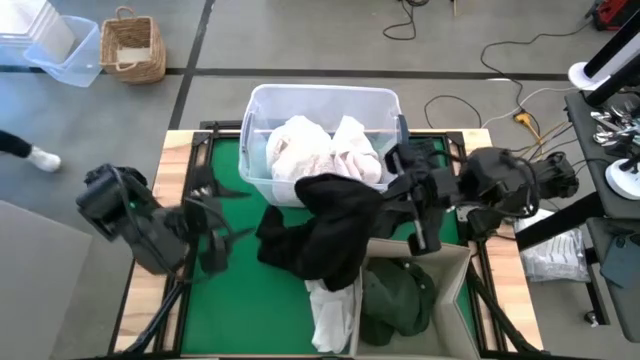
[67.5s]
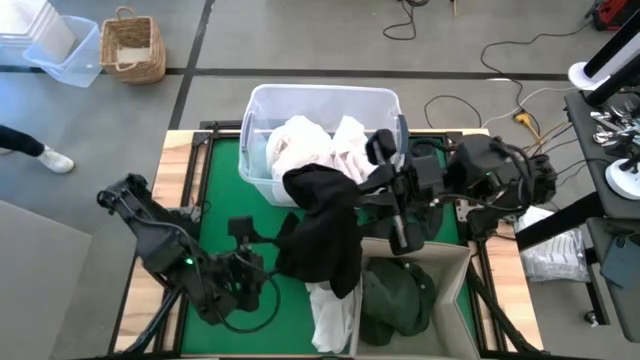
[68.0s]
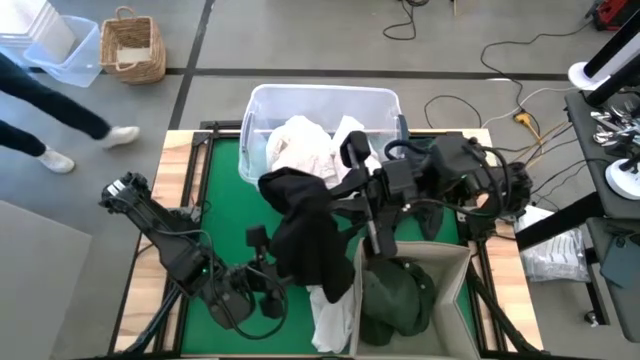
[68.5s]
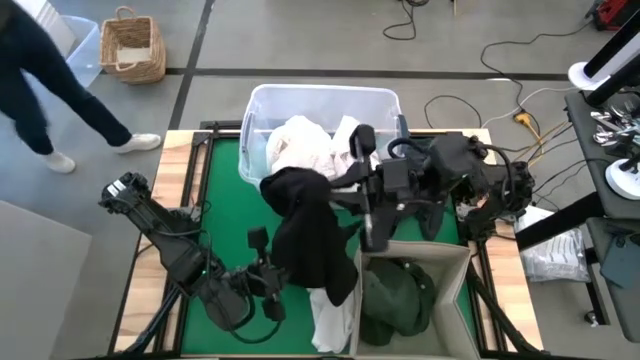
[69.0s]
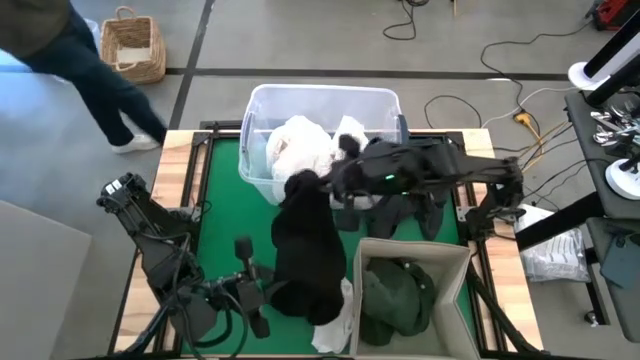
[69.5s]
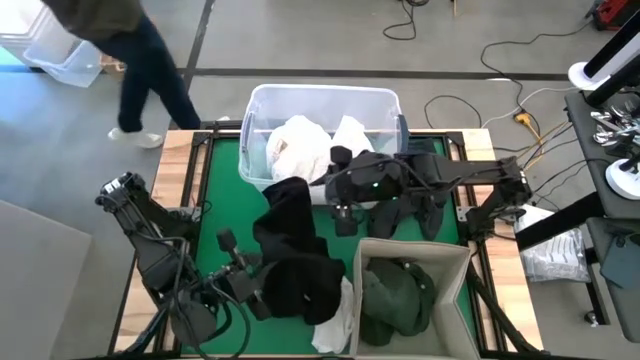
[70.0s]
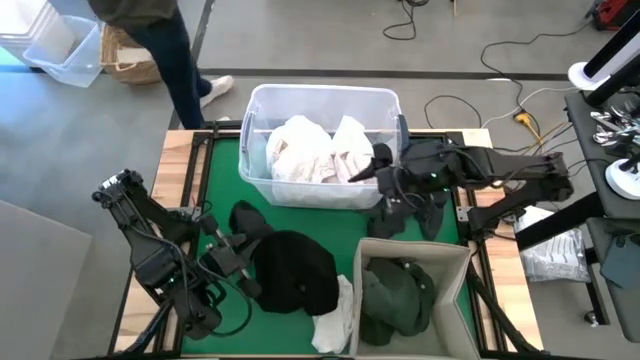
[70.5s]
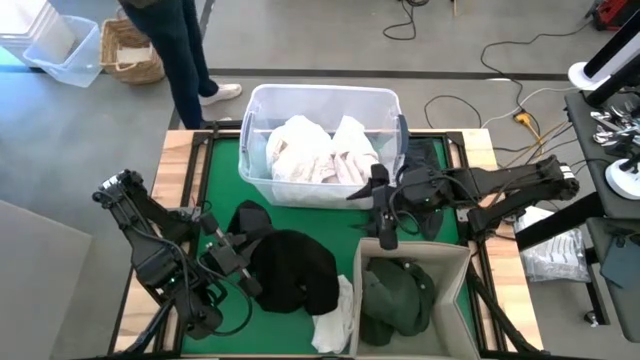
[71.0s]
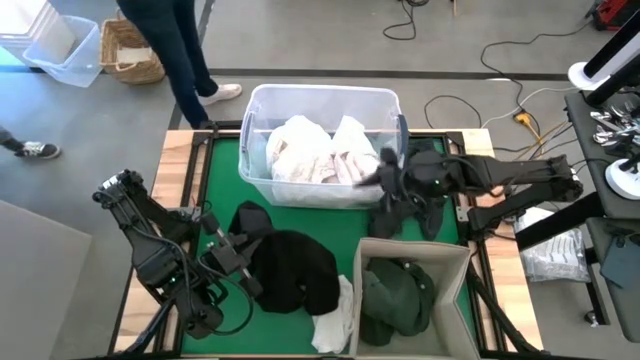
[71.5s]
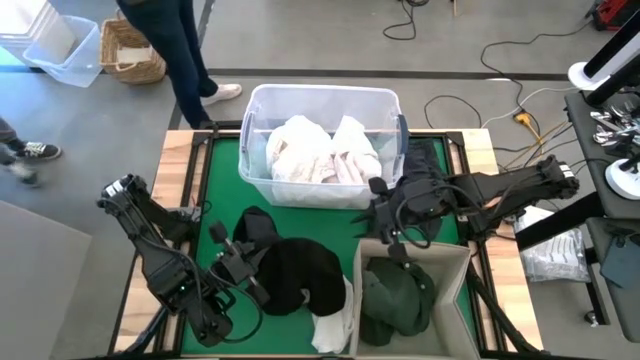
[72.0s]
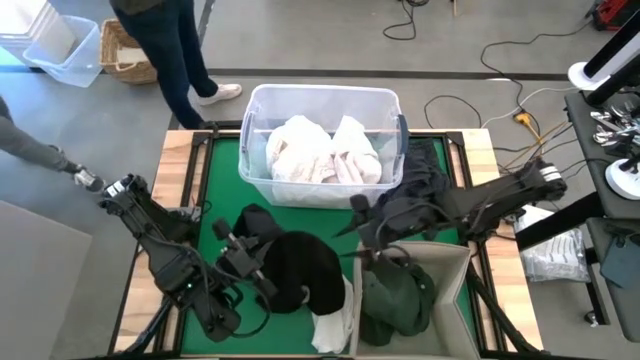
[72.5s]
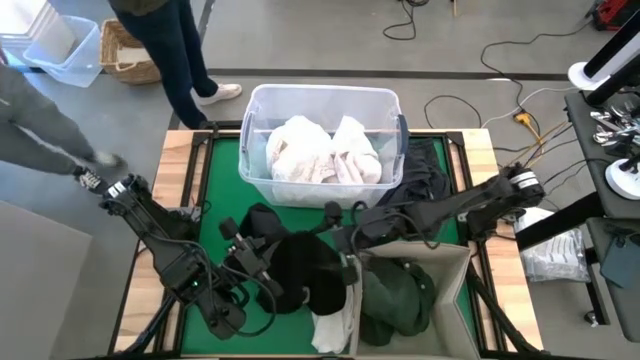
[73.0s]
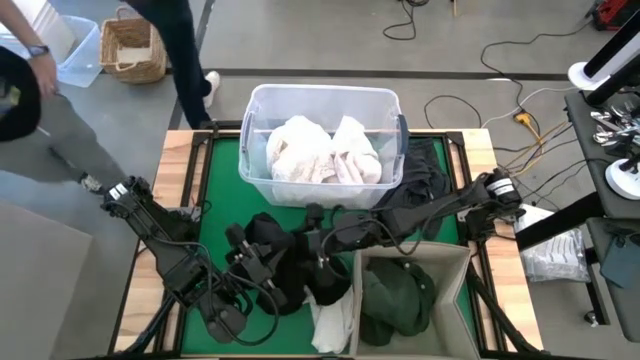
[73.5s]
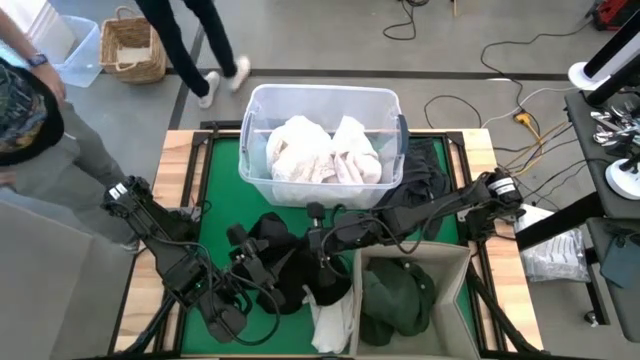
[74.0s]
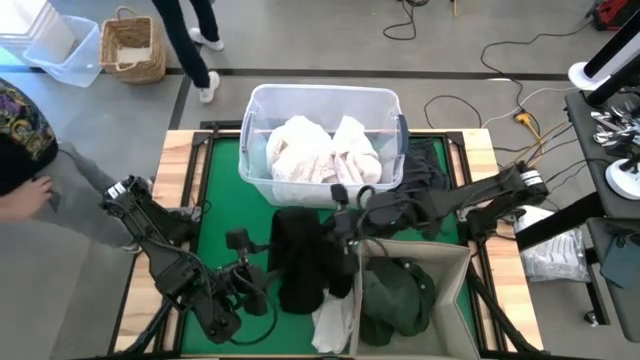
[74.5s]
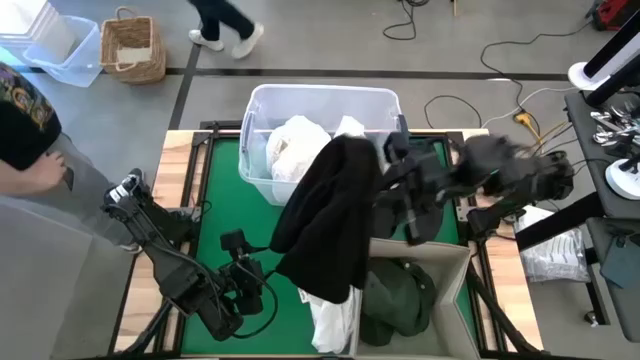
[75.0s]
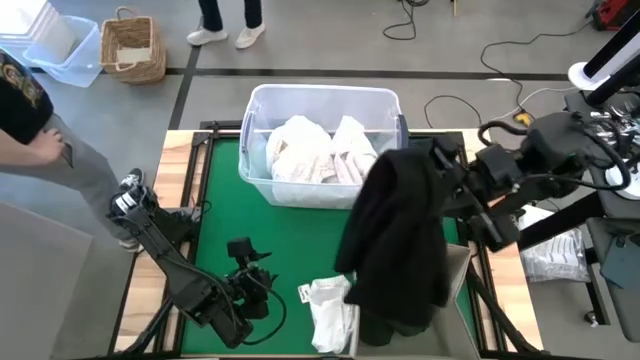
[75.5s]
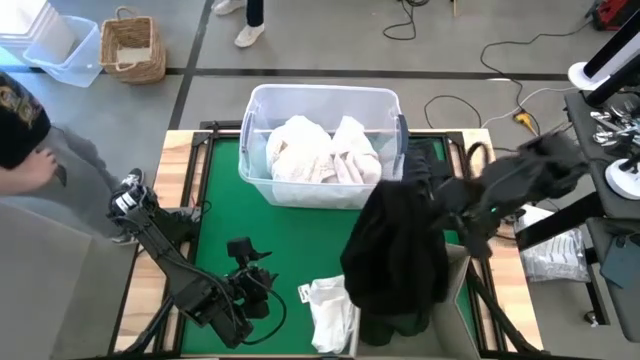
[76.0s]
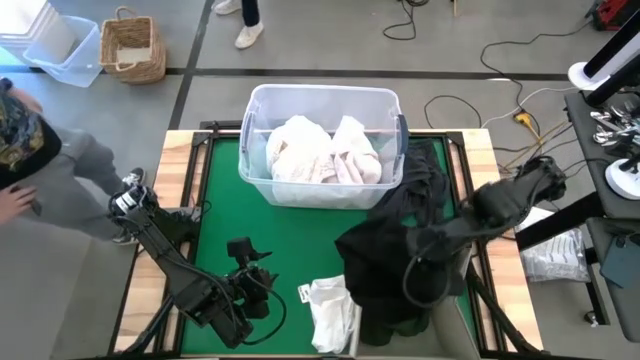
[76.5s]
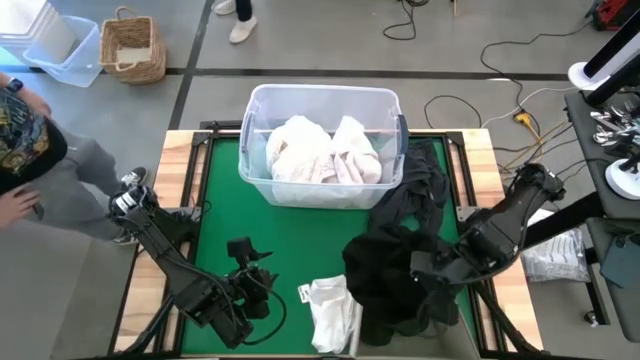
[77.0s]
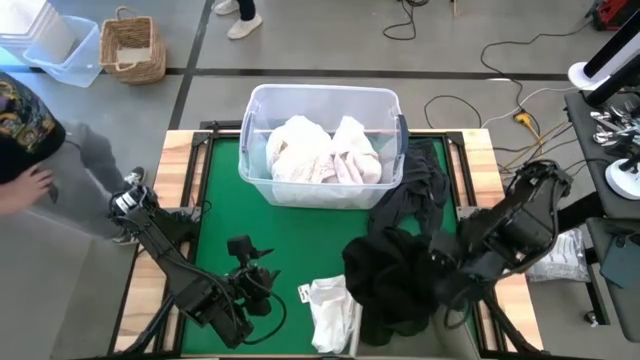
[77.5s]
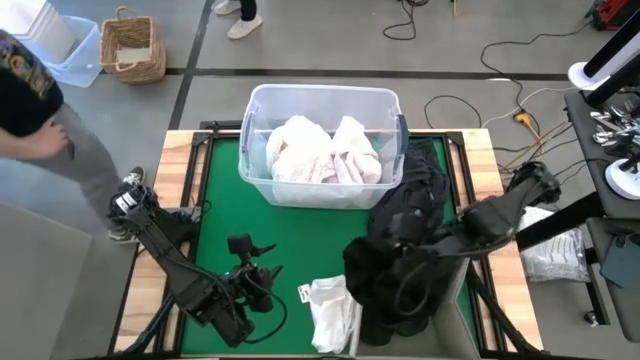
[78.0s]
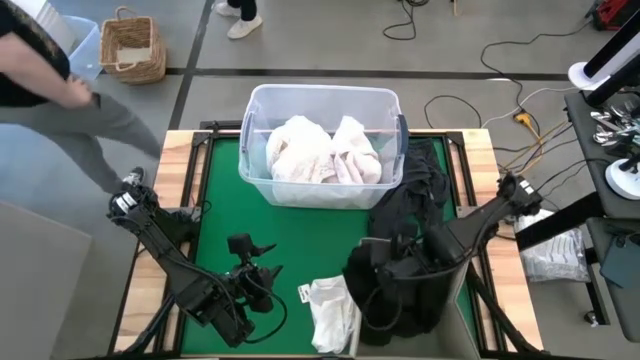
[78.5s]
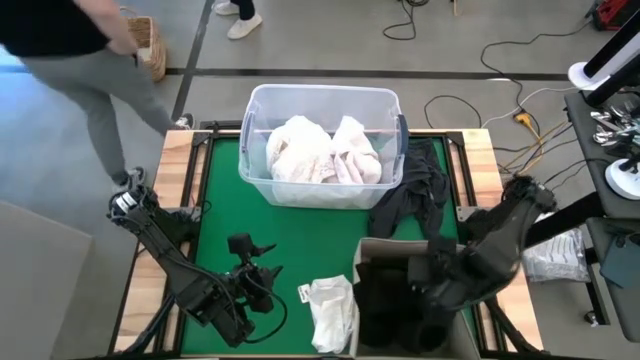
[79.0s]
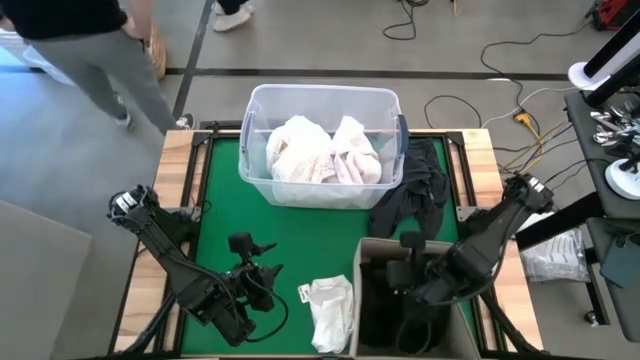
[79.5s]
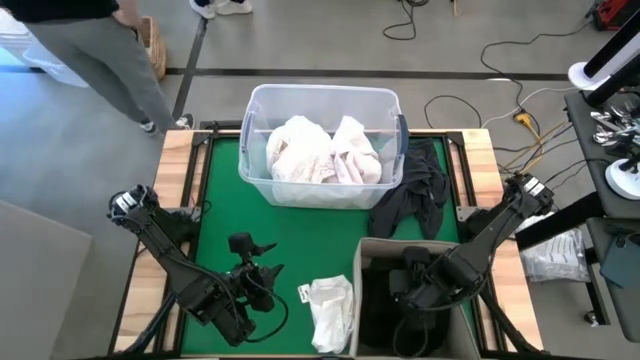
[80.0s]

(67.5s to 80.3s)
Put the black pants into the brown laundry bin

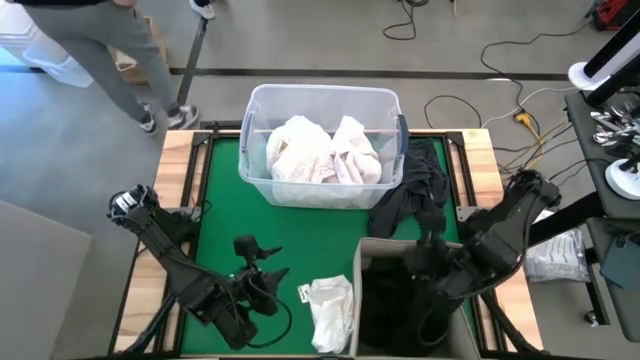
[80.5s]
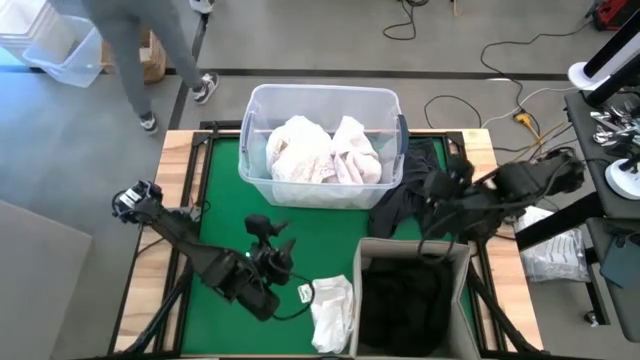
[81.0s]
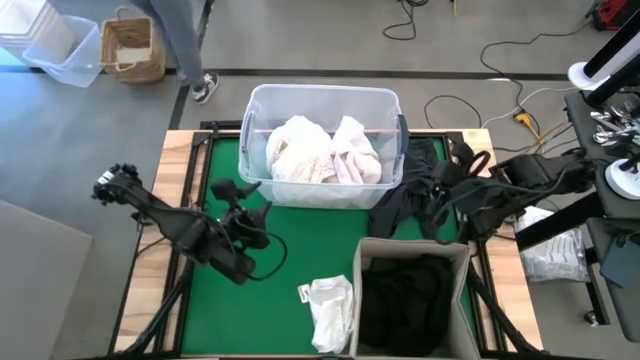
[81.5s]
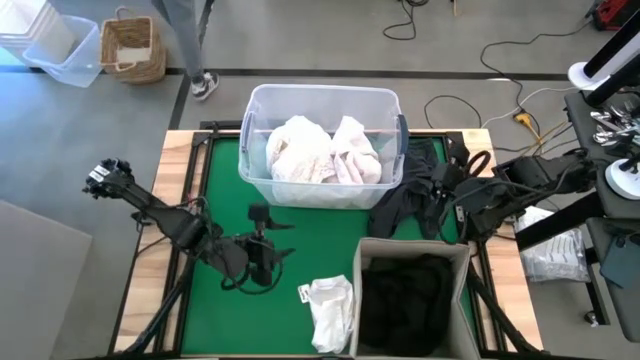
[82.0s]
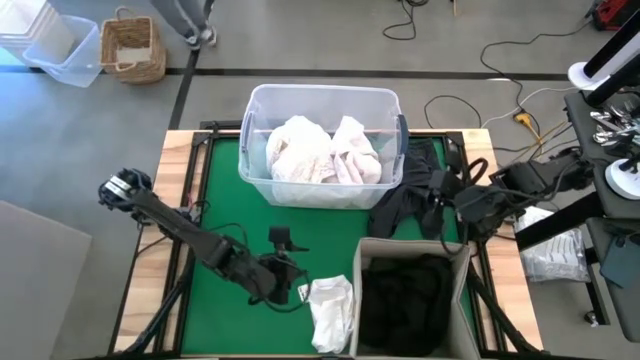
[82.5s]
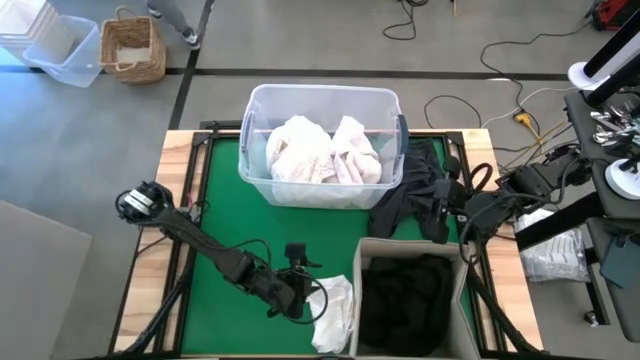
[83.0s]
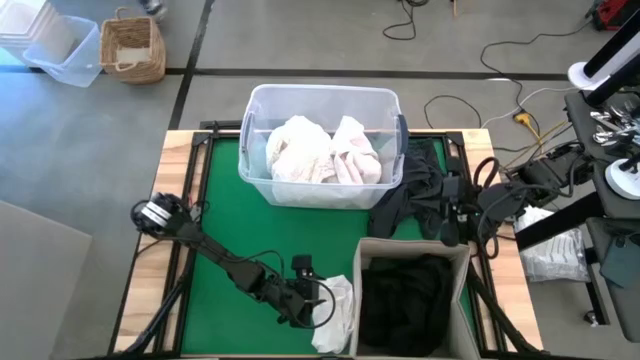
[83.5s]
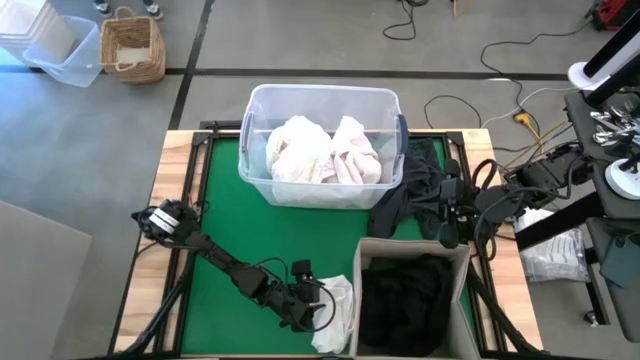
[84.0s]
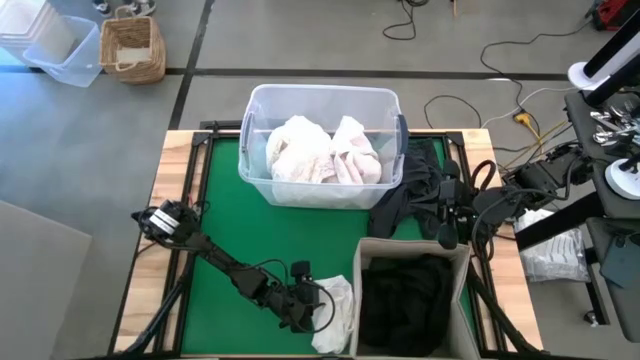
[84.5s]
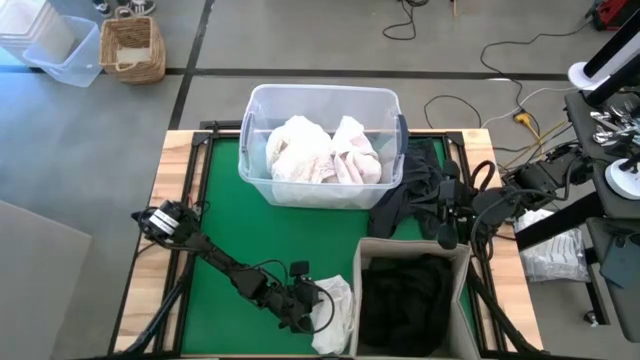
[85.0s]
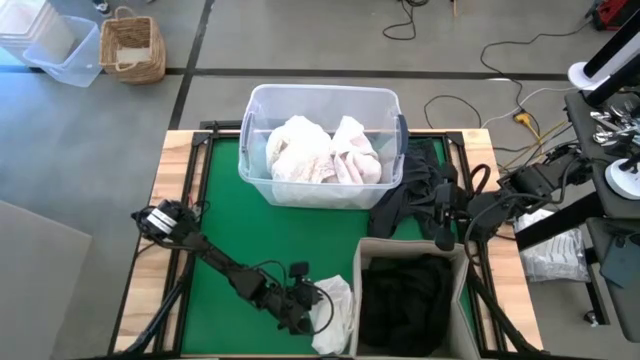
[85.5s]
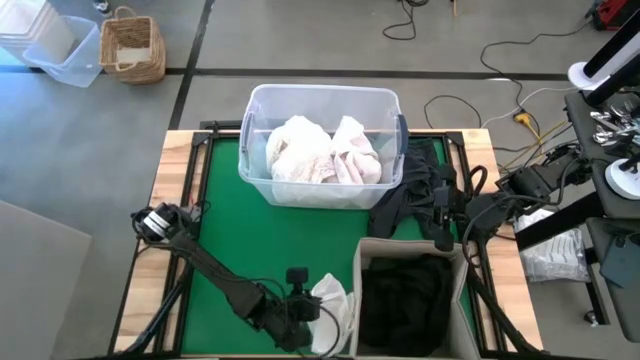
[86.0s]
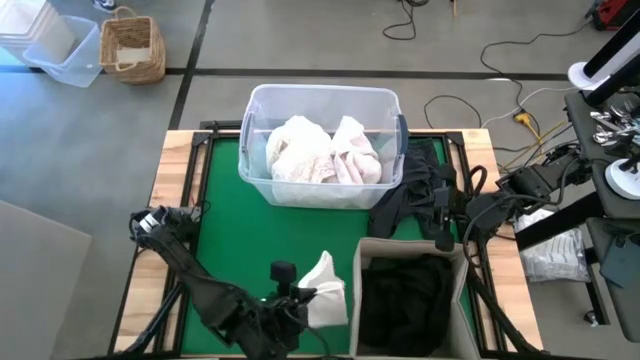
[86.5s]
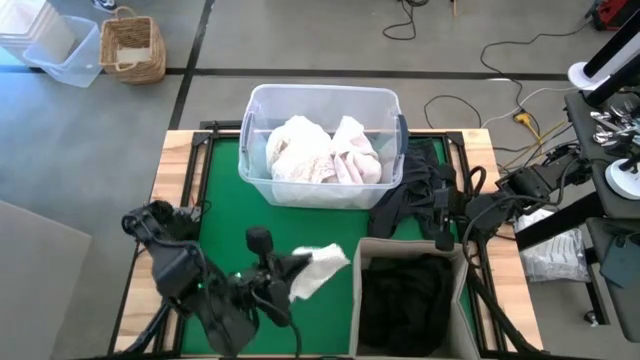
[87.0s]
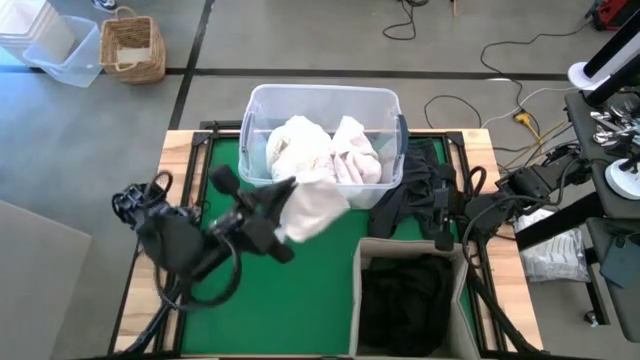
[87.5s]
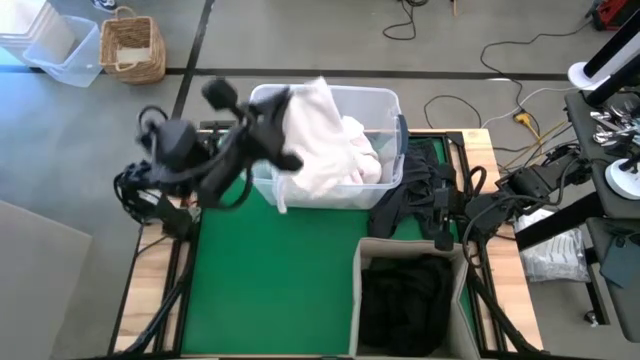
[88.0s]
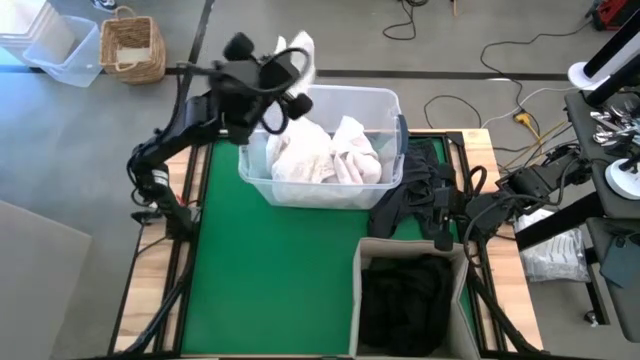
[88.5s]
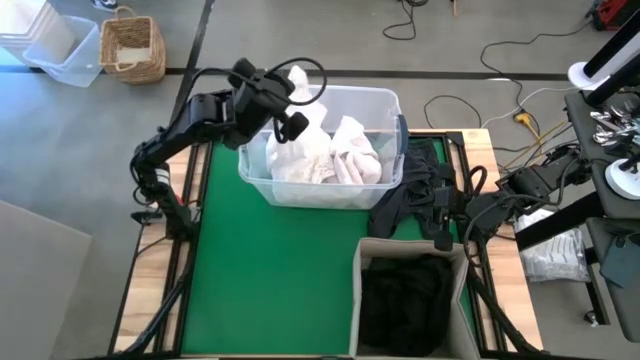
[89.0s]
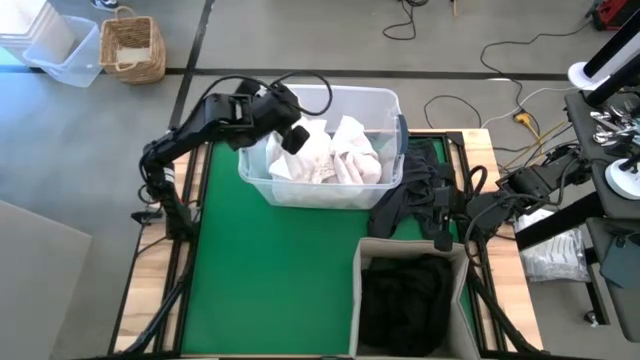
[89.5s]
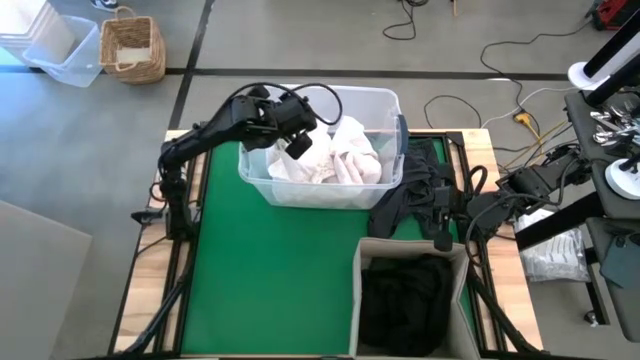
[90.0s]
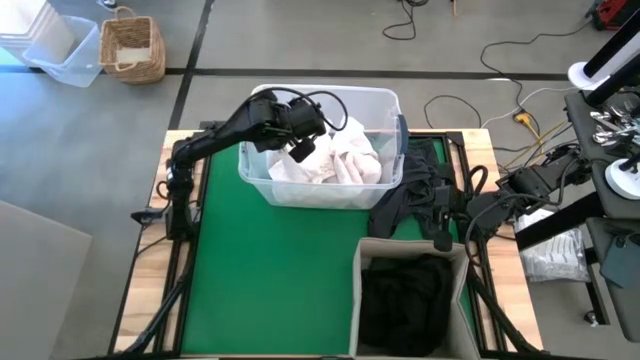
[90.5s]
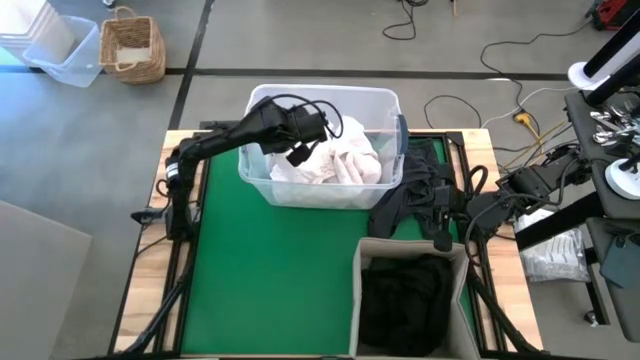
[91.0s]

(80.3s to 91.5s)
Put the white shorts into the transparent laundry bin
